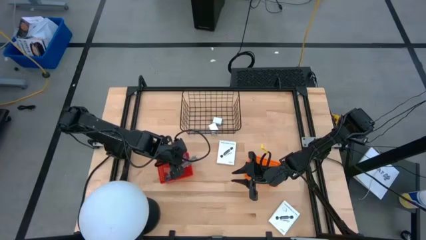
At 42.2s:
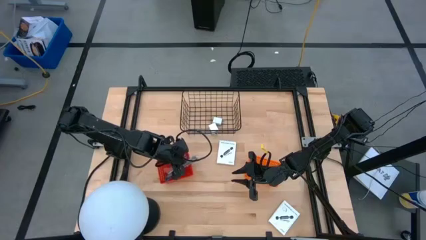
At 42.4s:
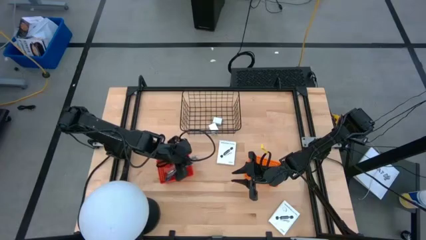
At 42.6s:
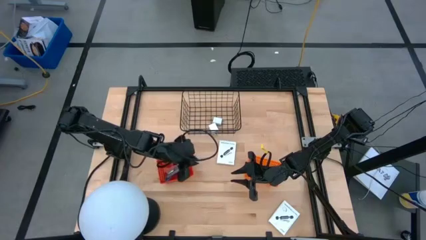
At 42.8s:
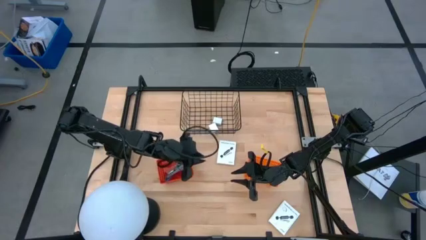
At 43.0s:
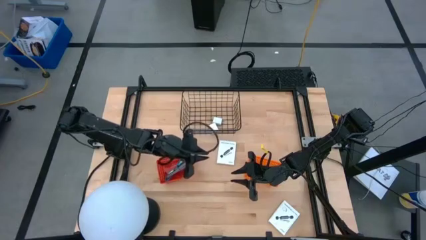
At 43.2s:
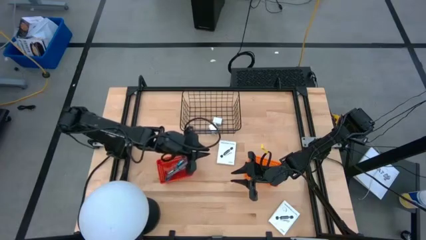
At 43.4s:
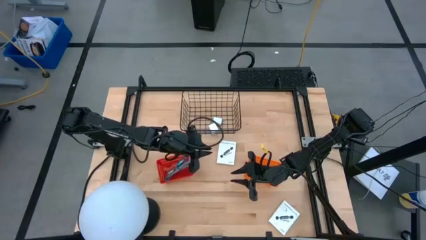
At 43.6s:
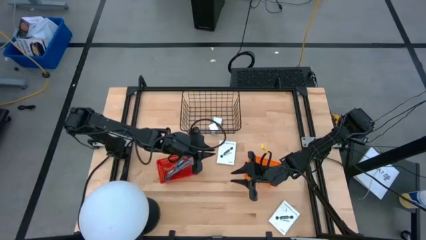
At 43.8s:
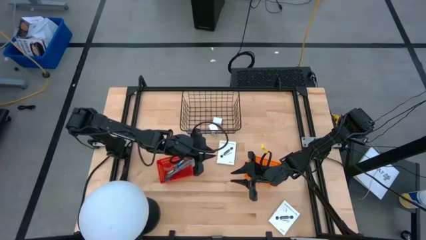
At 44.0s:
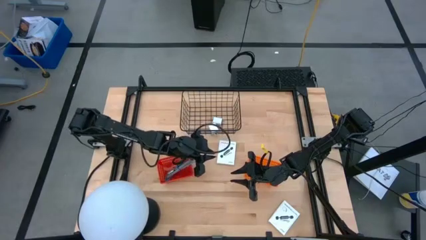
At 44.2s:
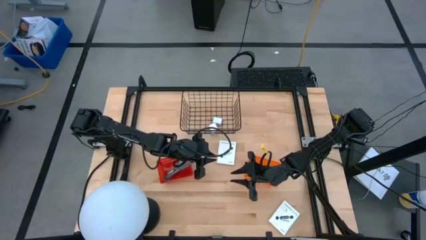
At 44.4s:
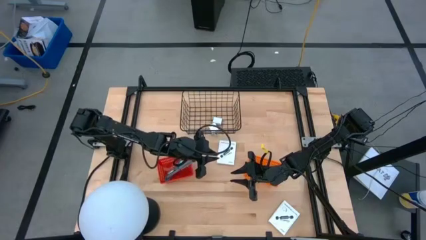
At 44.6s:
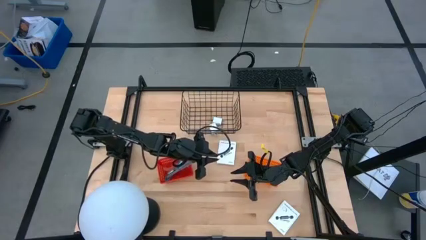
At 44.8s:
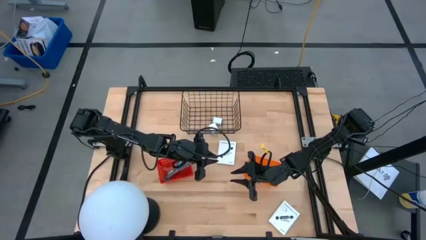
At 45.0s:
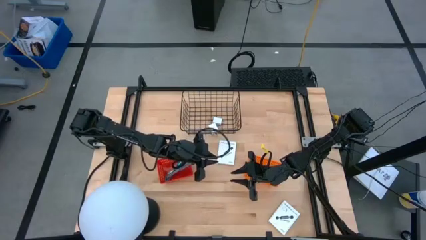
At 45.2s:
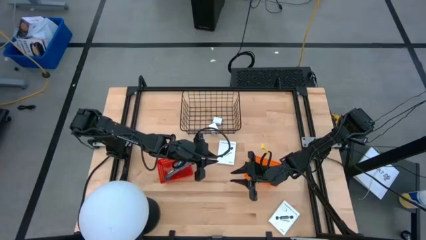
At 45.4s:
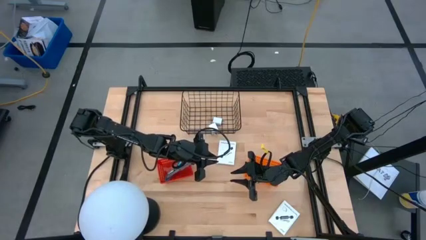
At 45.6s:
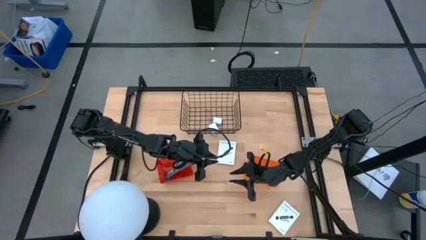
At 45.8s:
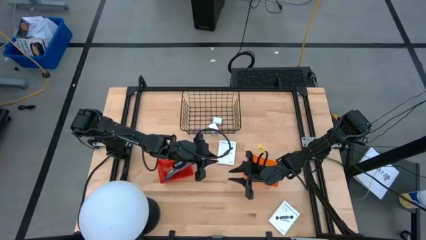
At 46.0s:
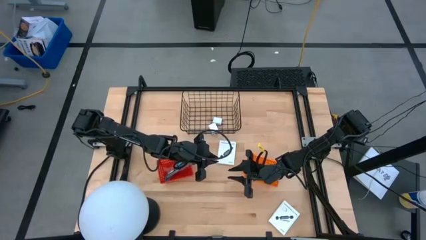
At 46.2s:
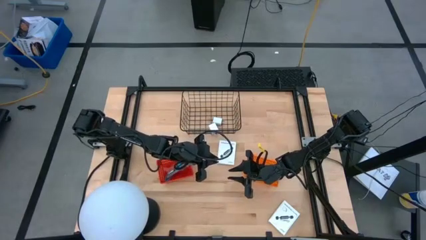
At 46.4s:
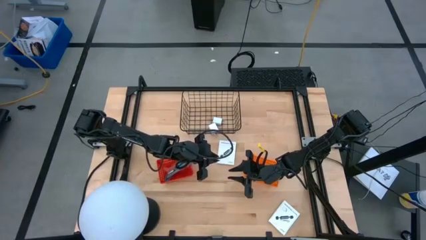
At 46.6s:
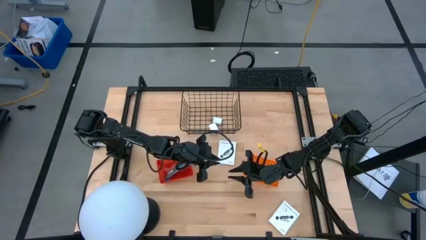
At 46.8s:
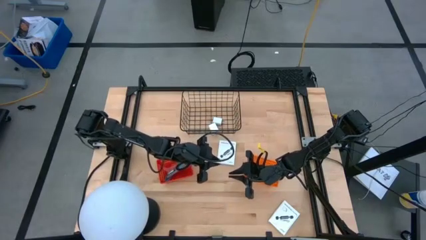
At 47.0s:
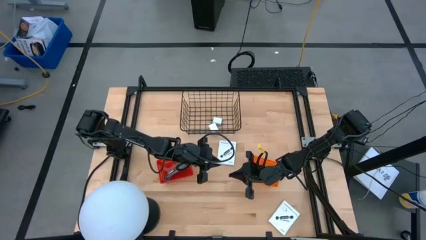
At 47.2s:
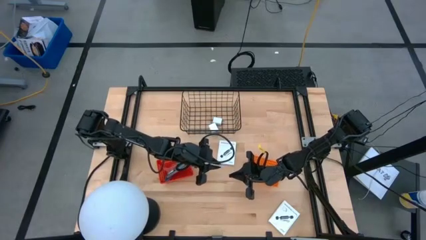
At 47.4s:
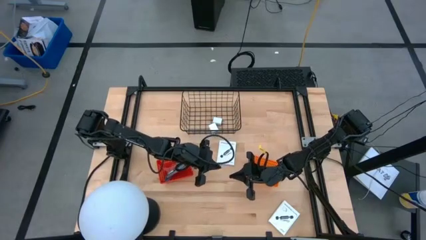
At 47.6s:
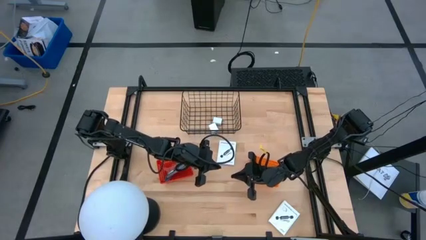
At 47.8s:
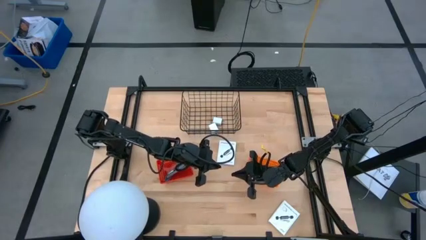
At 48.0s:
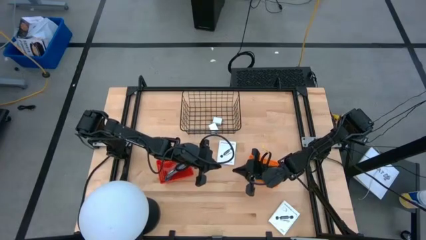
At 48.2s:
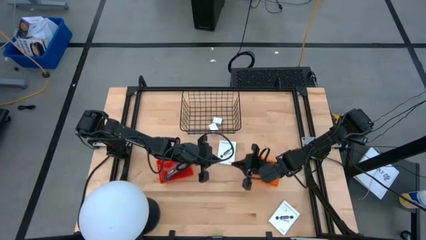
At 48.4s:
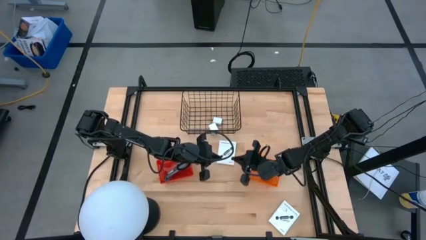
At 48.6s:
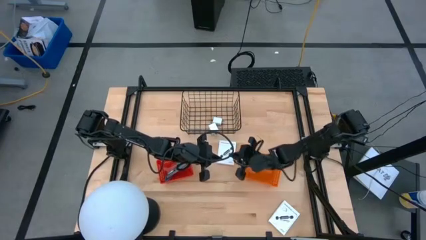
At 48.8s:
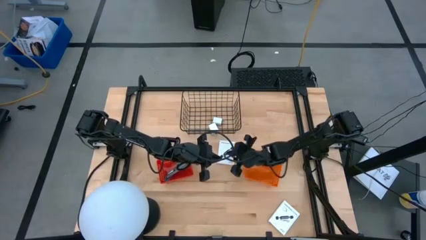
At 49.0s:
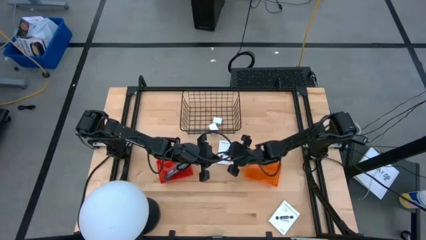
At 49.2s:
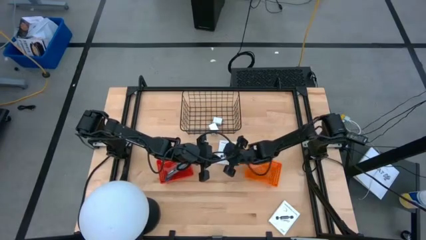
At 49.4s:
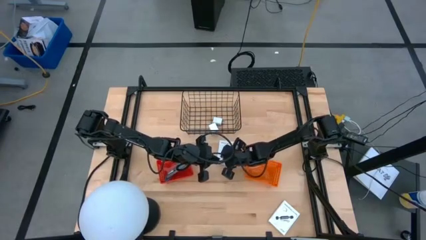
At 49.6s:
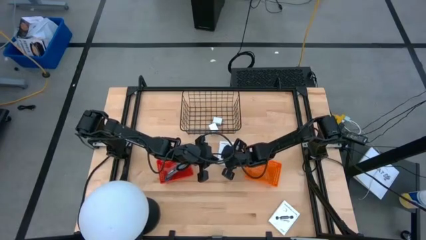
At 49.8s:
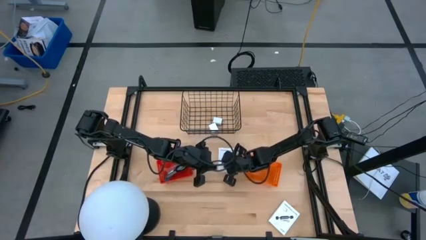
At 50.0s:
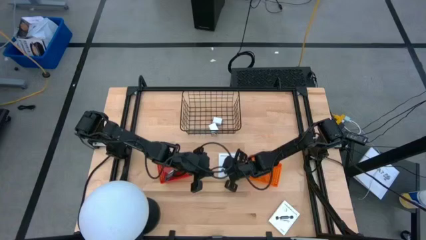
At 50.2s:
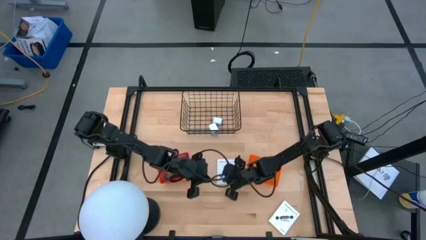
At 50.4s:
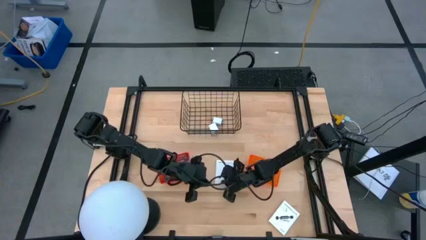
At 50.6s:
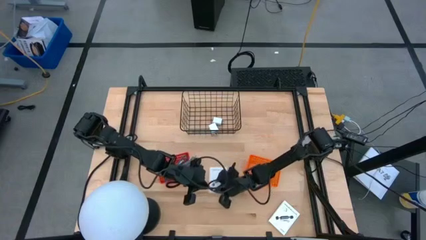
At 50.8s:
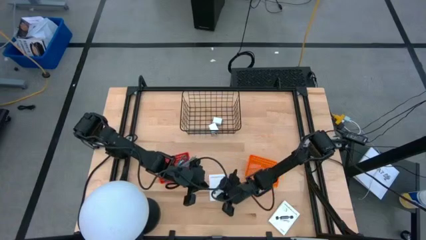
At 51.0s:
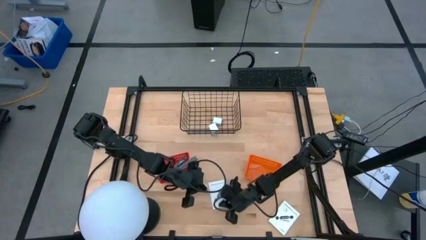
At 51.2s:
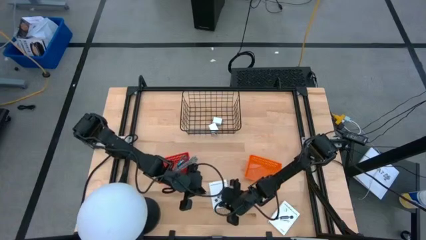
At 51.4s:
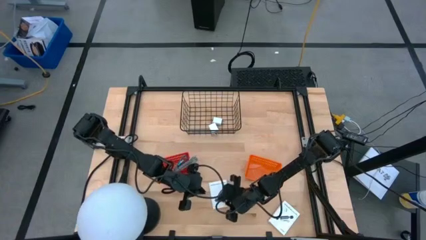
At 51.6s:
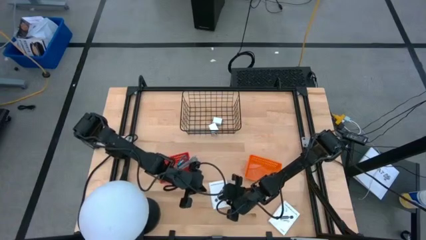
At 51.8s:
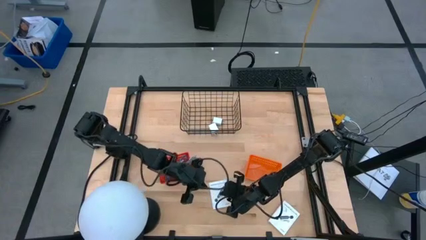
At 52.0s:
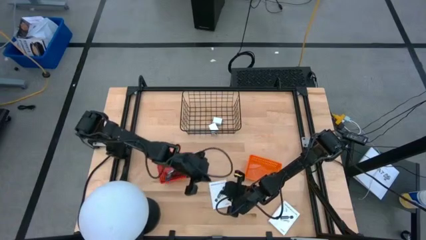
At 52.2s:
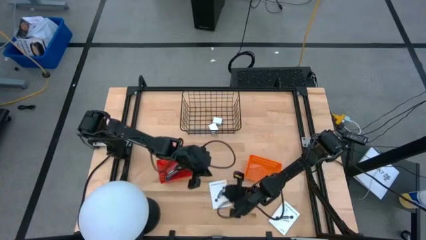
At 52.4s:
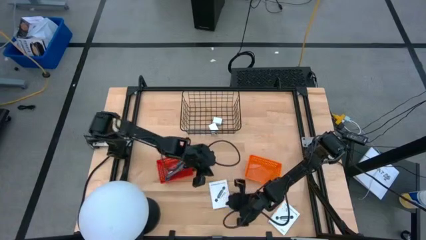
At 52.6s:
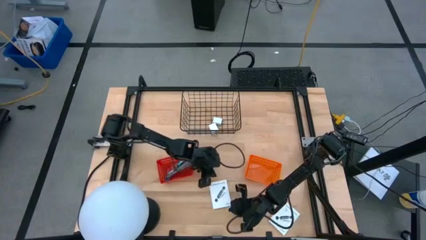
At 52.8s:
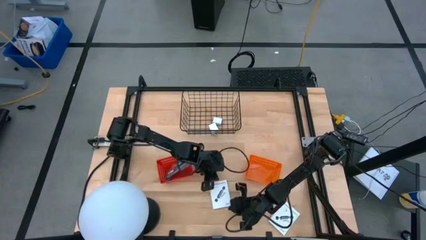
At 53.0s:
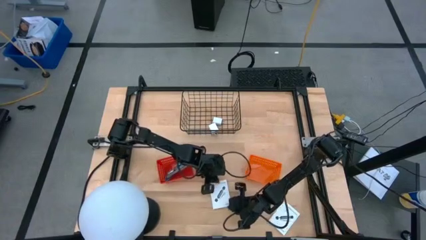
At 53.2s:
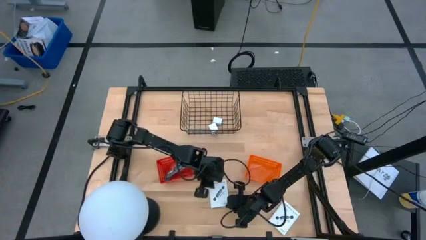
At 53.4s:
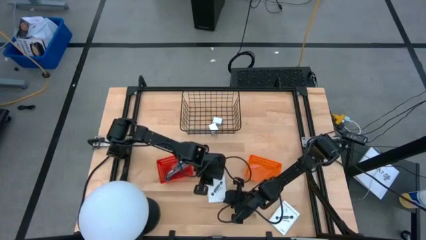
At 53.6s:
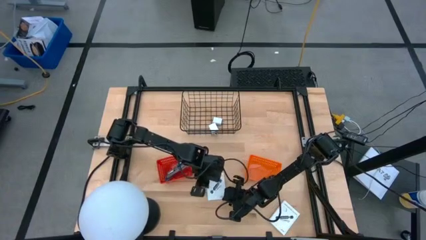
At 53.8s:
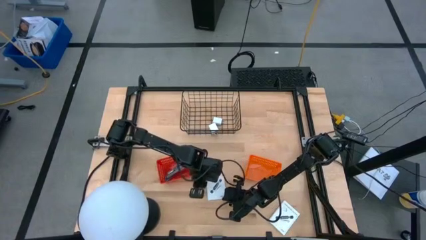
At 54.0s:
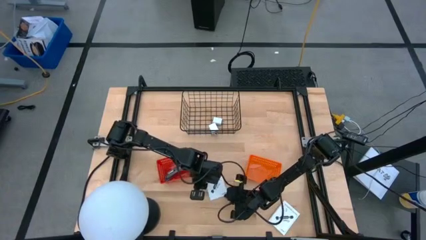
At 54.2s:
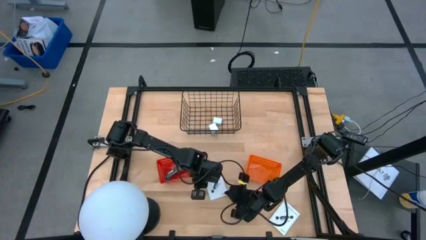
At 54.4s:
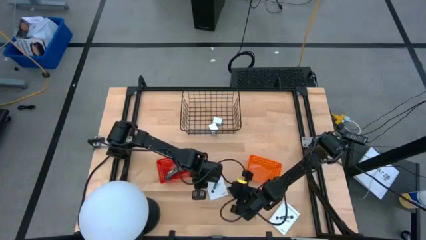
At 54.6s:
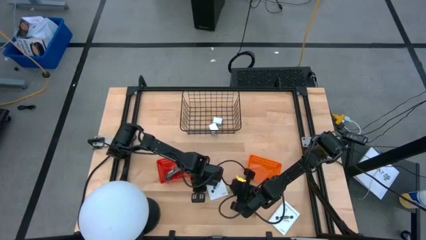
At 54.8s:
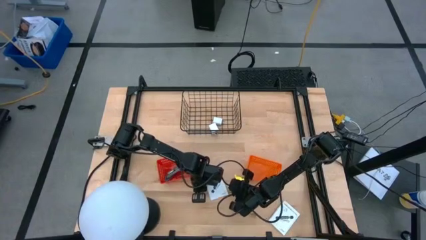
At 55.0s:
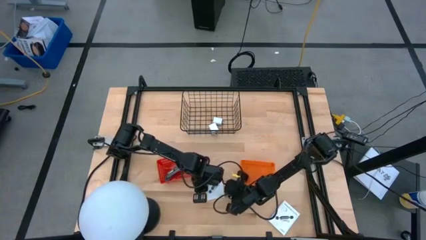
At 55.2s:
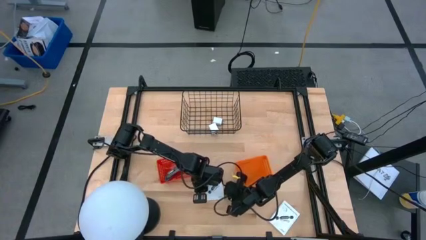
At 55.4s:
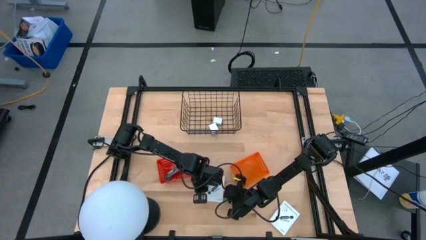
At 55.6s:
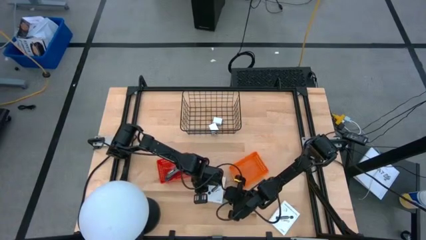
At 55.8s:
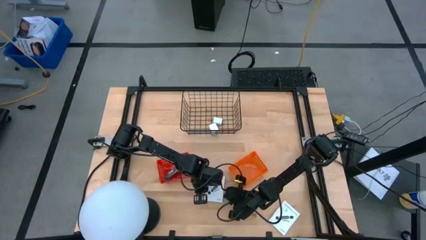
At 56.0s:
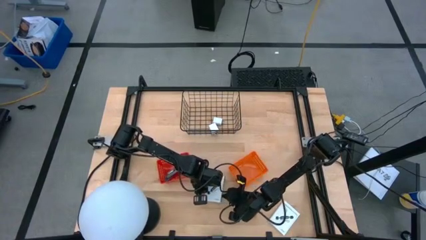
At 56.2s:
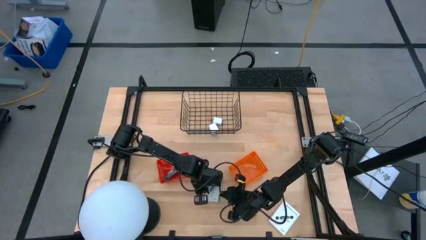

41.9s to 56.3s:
Task: Pick and place items into bin
Put the top card reader box into the orange basket

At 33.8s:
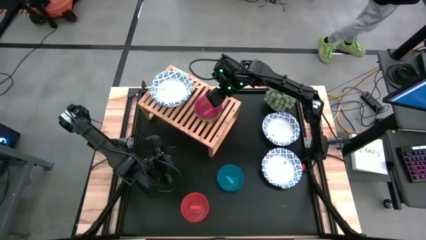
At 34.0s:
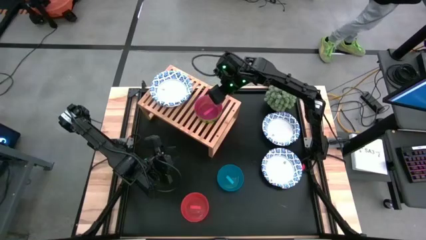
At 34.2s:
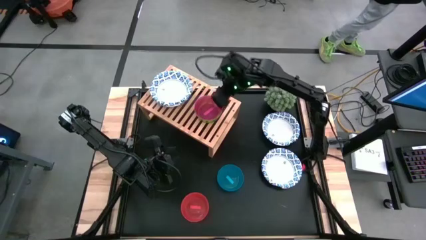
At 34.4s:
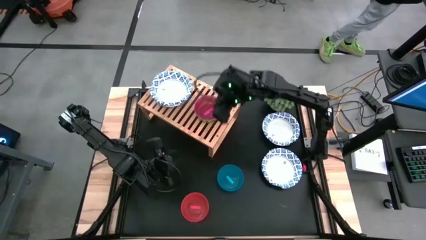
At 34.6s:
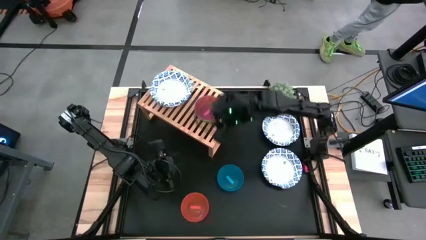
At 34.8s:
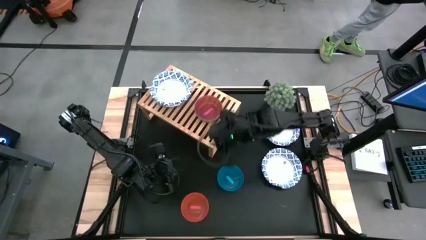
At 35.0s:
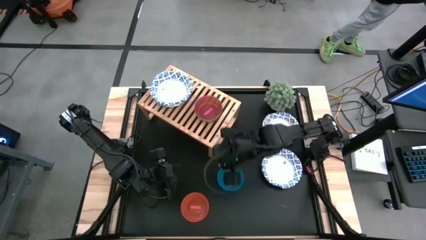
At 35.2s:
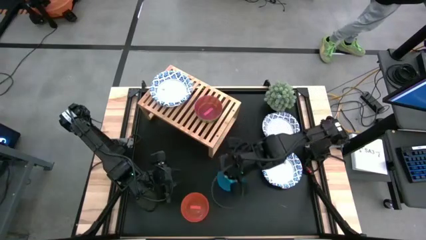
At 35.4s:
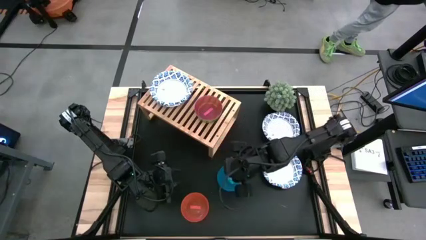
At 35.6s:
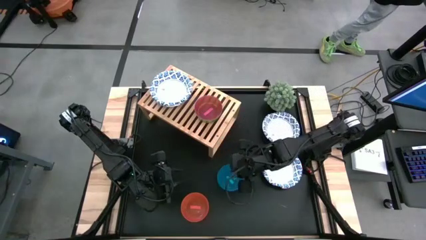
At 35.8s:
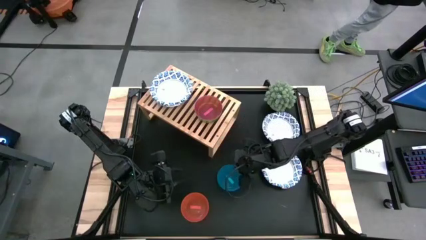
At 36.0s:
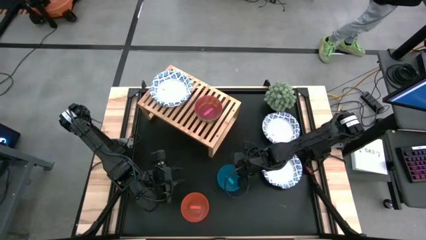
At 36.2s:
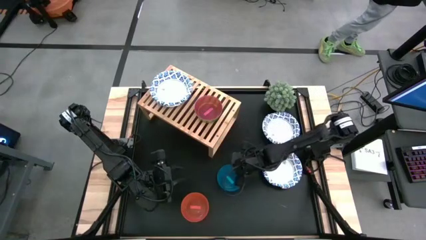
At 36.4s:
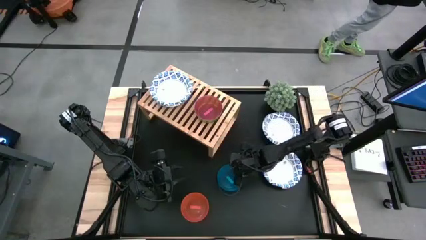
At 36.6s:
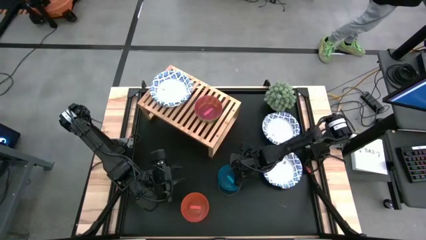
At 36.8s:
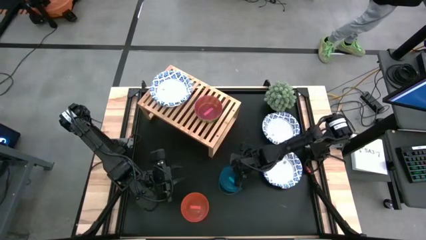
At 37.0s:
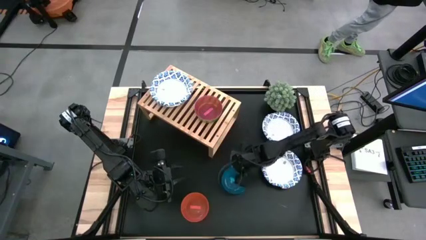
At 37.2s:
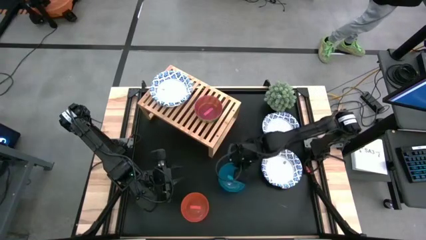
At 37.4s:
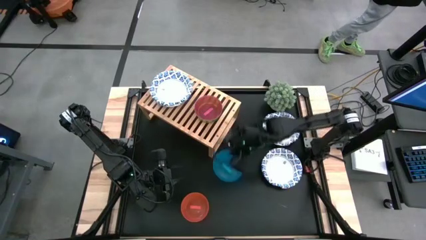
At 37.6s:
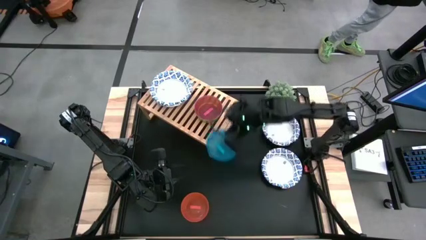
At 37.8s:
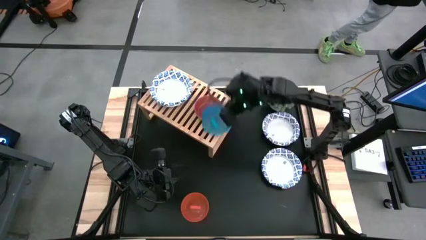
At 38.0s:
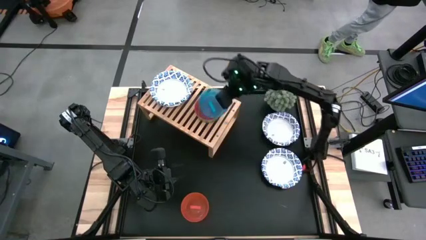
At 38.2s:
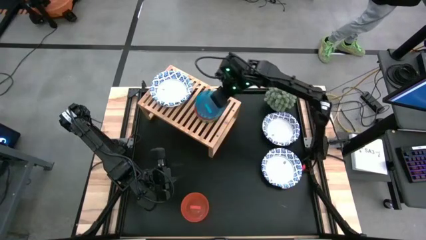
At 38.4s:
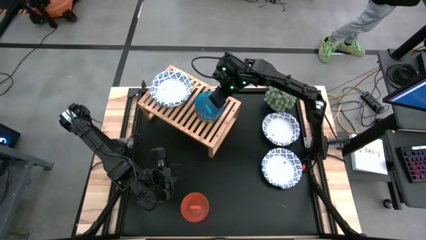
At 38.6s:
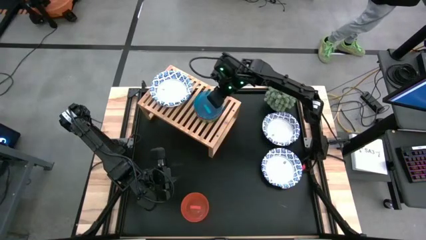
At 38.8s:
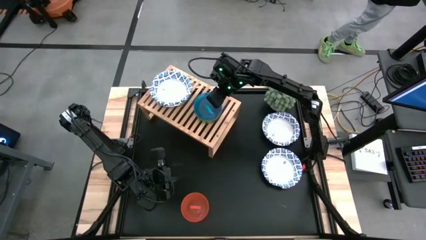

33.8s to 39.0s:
Task: Place and stack bowls onto a shelf
Stack the blue bowl into the pink bowl
